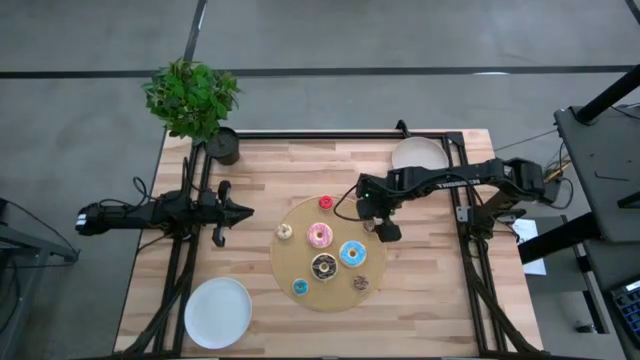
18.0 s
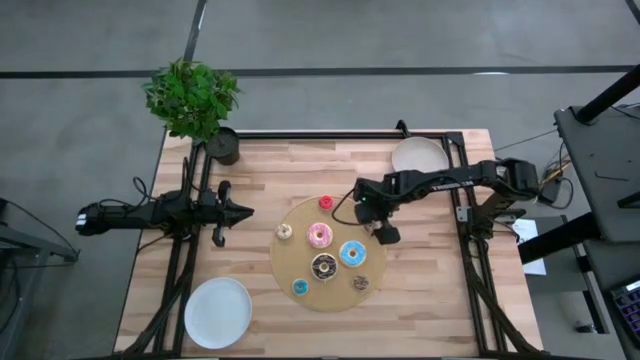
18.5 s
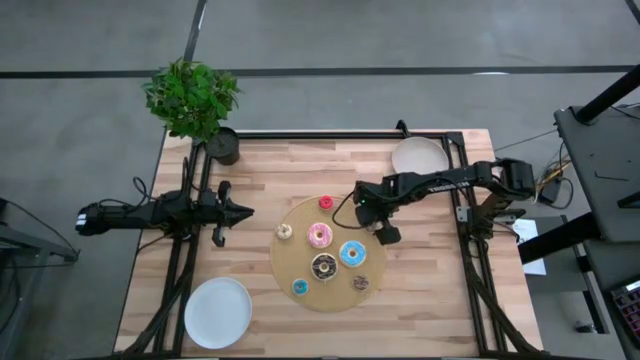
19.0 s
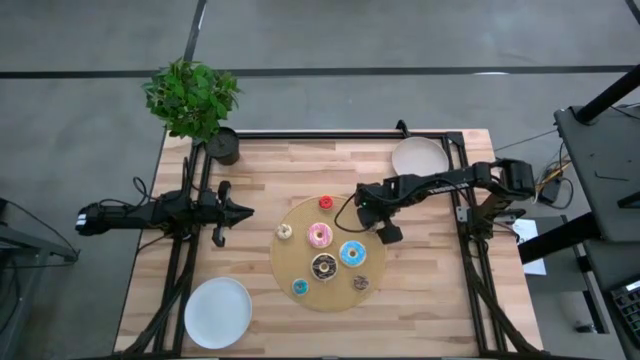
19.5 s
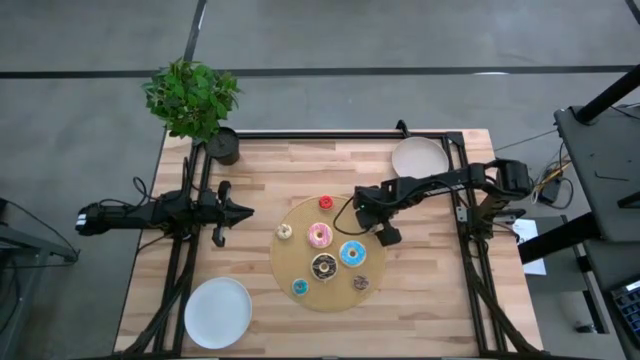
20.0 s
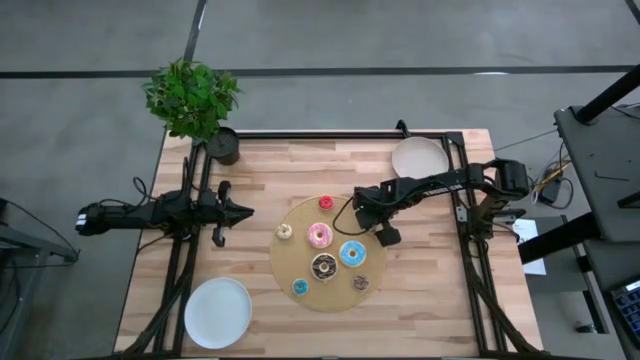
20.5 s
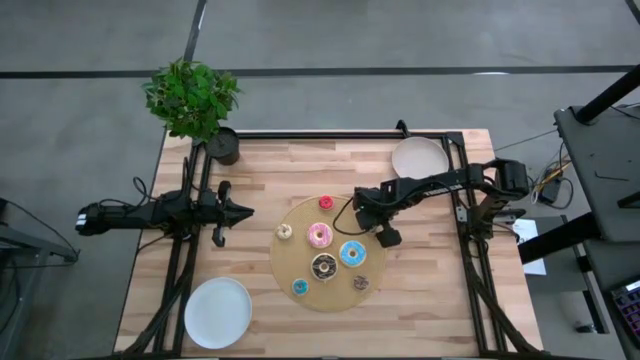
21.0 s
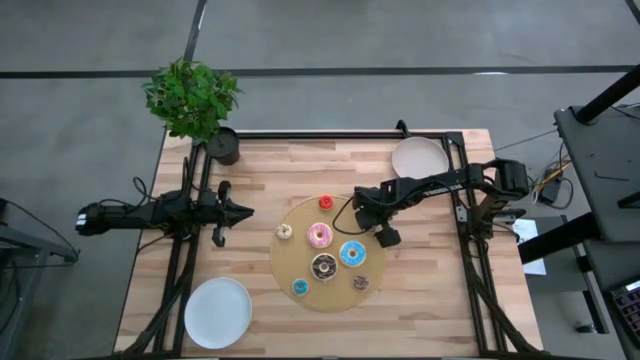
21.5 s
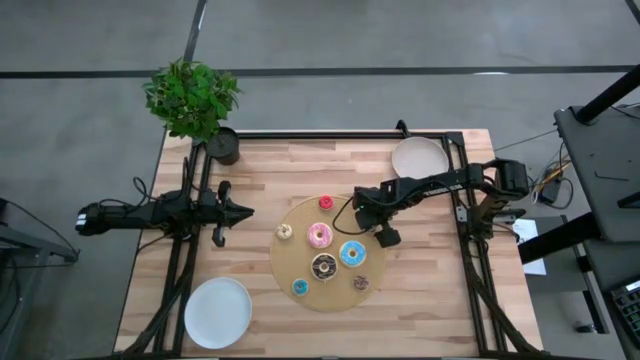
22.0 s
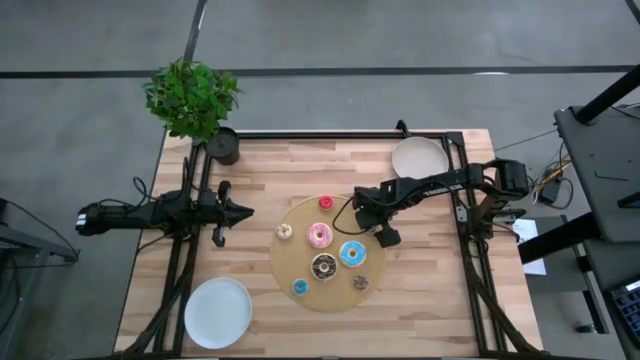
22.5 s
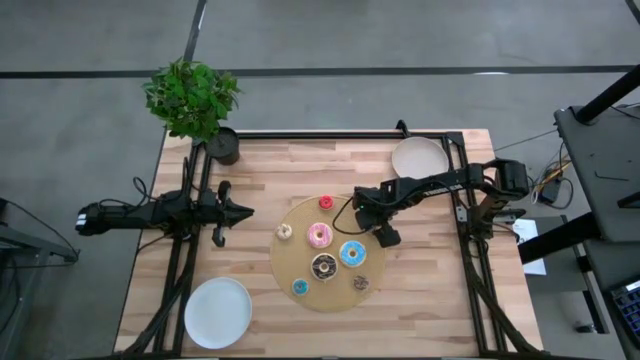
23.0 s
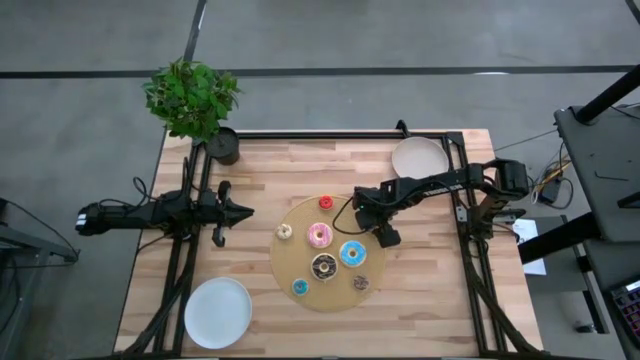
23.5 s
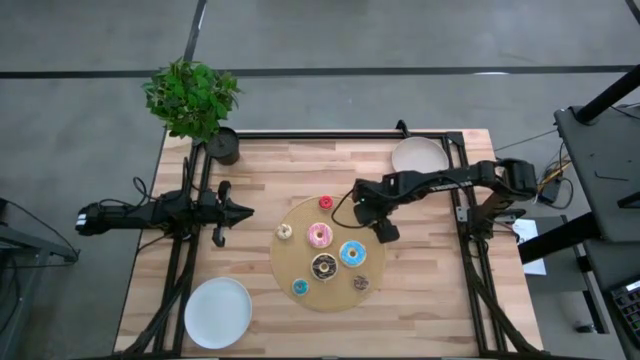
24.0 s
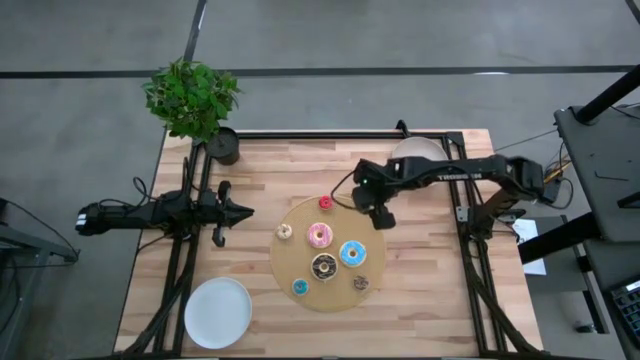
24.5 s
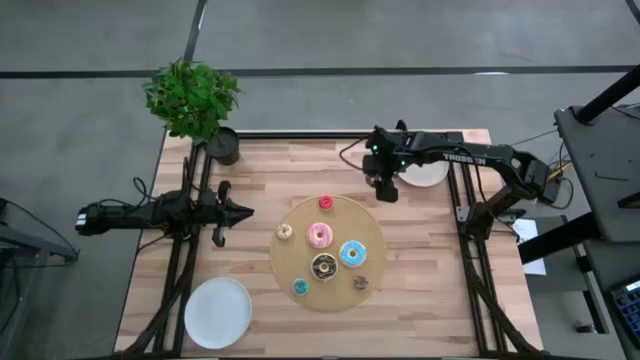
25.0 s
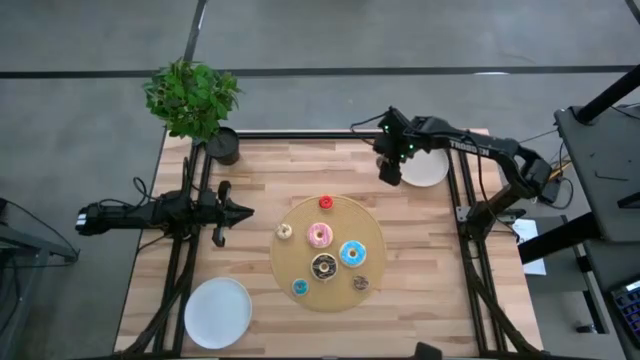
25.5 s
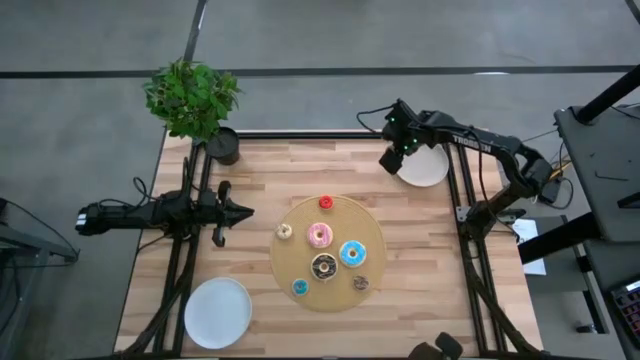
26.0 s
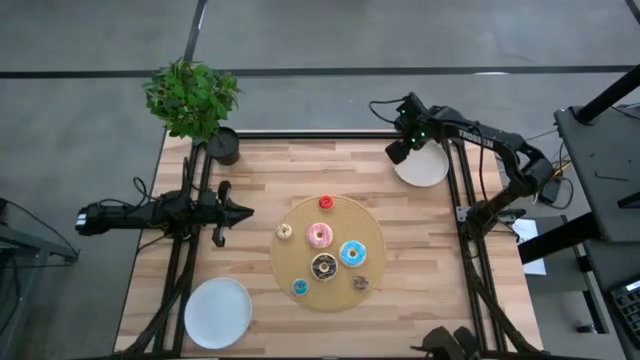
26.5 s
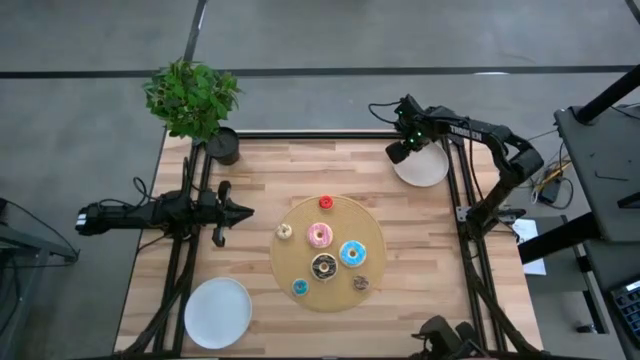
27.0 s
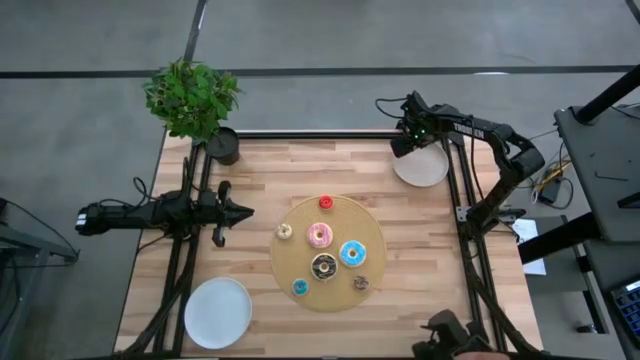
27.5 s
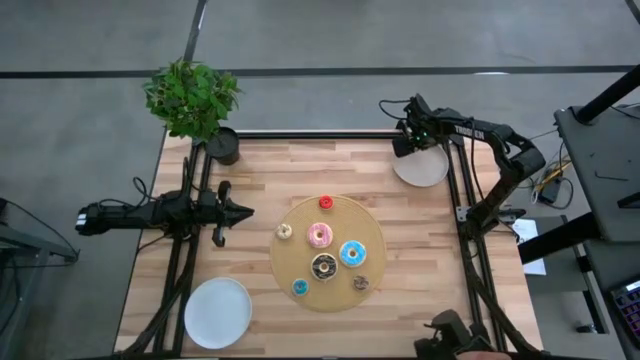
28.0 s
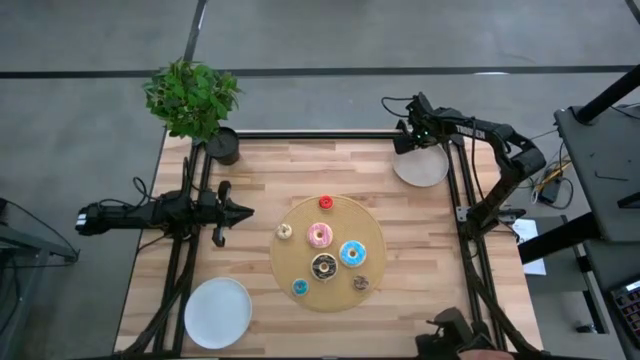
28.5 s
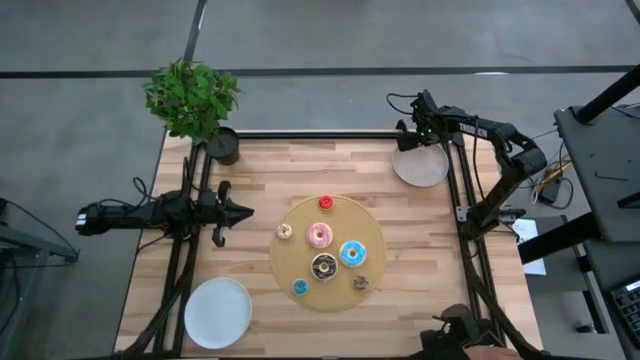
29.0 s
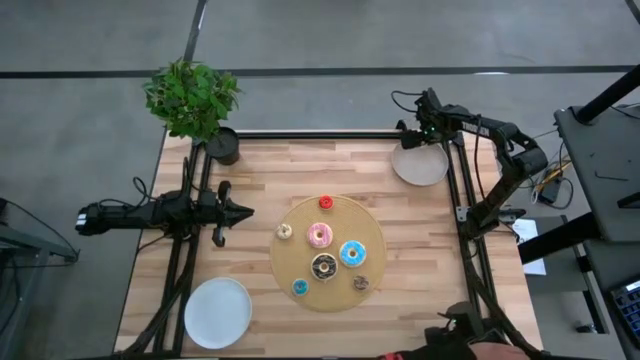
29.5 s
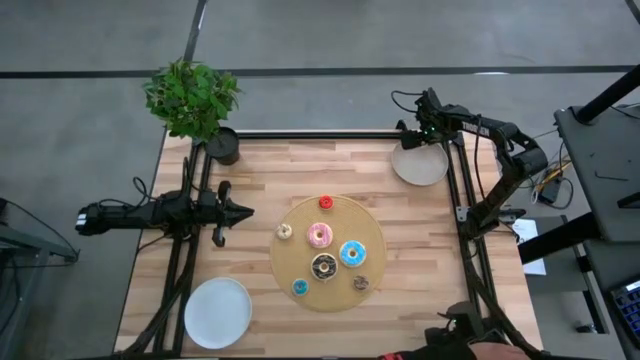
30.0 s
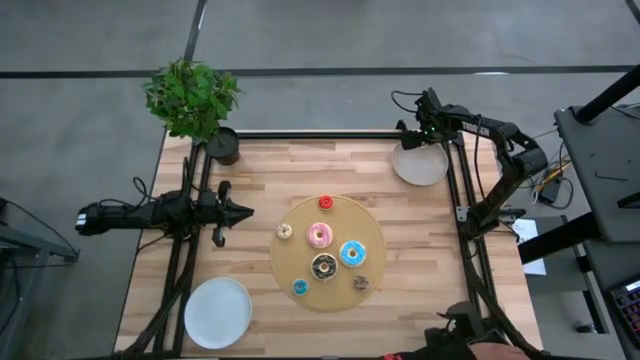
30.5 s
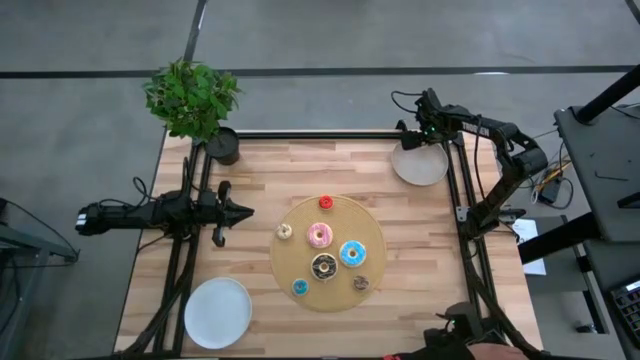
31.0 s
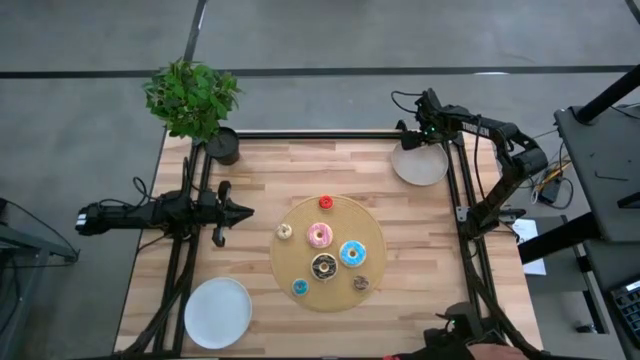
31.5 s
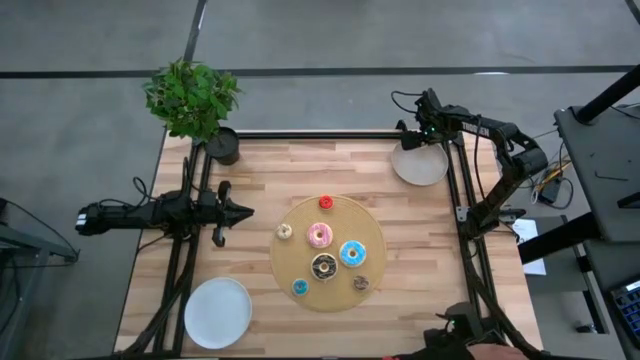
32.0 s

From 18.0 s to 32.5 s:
Task: Pick & Place donuts
Put the small brown donut on the gray plate

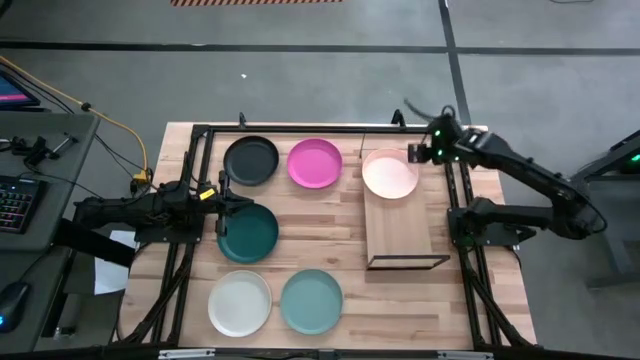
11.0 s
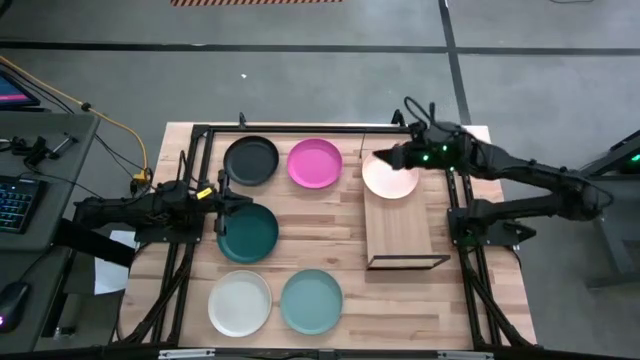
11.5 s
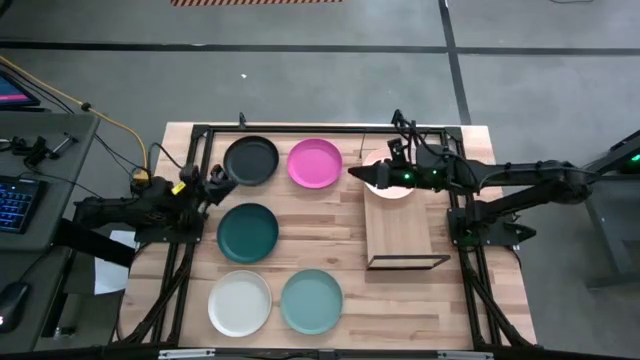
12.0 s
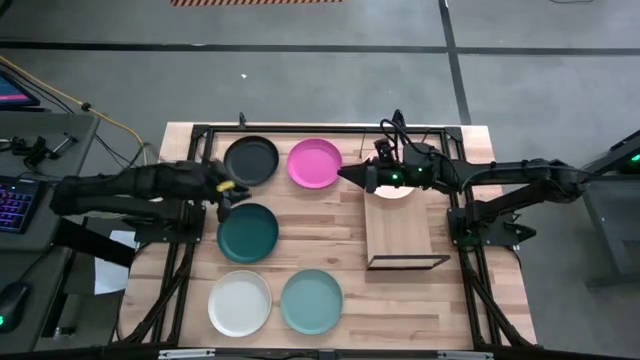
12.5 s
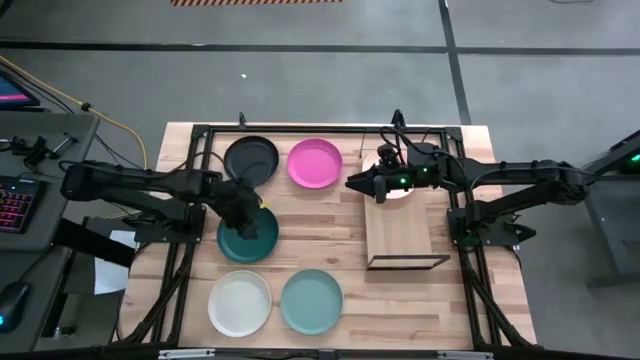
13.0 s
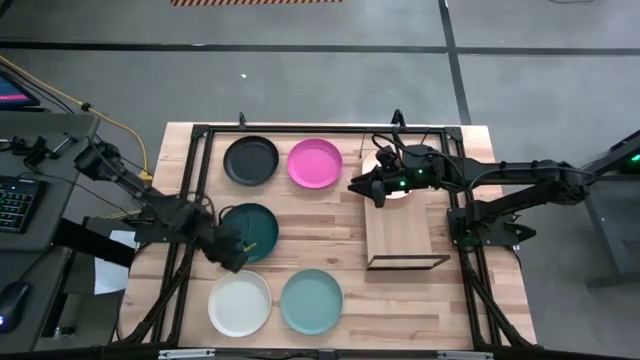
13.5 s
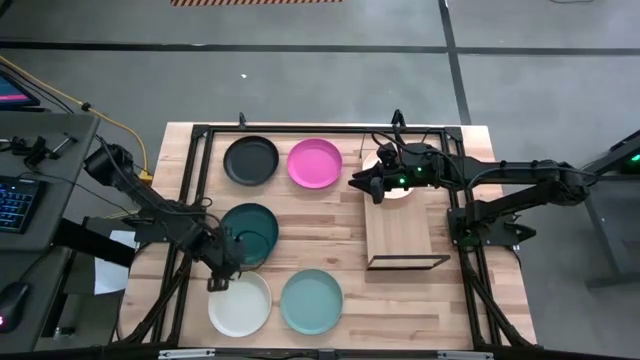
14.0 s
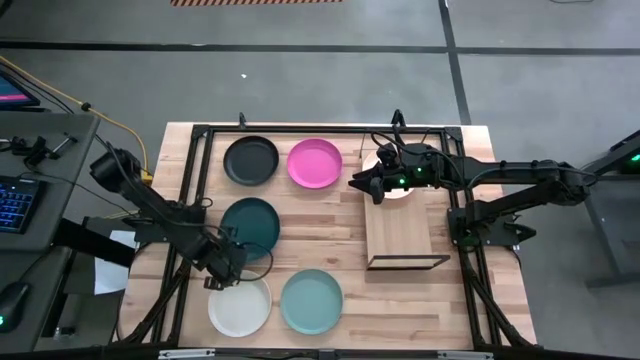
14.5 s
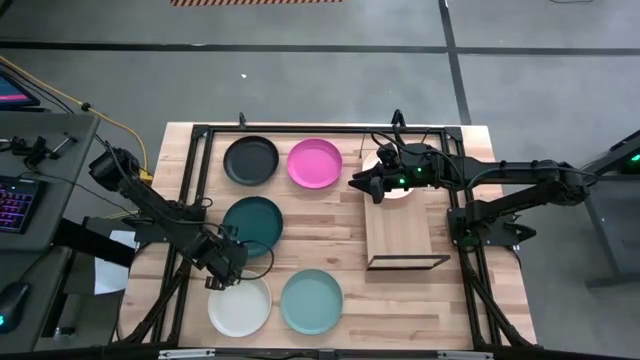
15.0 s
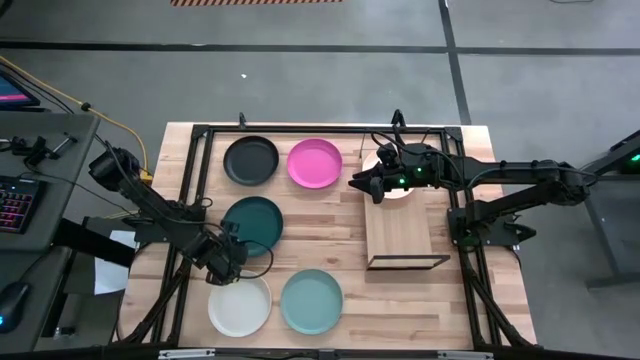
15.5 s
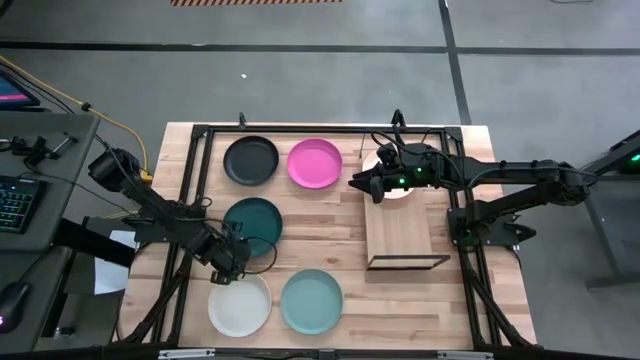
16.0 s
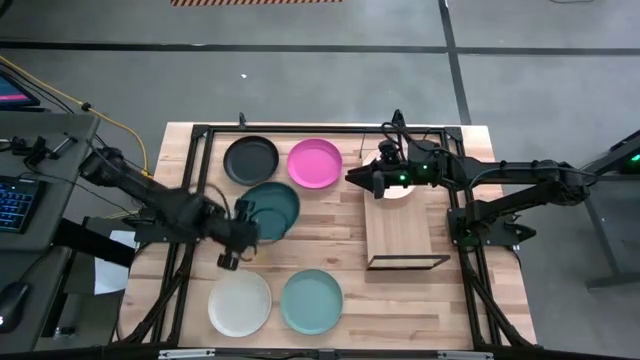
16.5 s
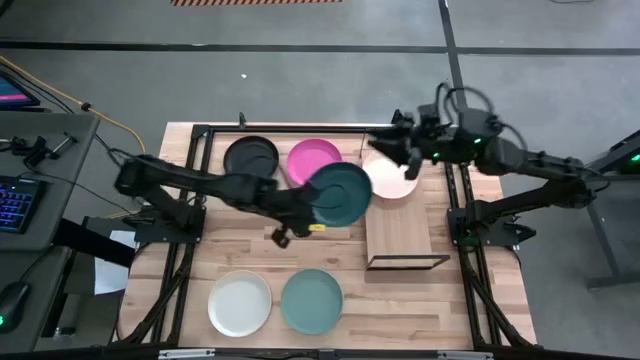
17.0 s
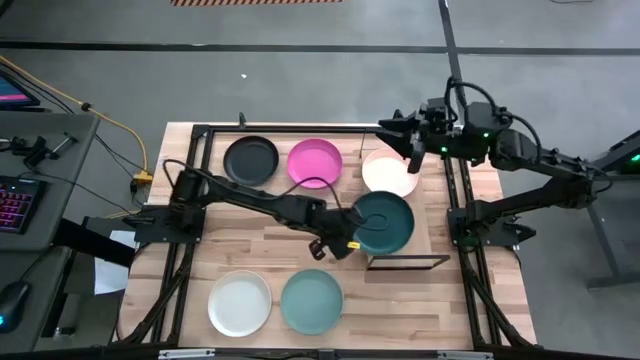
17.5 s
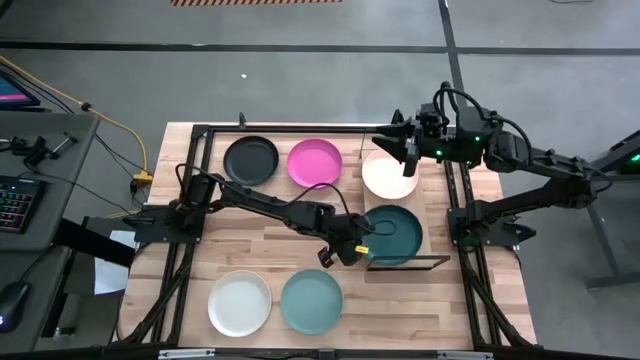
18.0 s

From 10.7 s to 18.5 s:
Task: Place and stack plates onto a shelf
Put the dark green plate on the shelf
